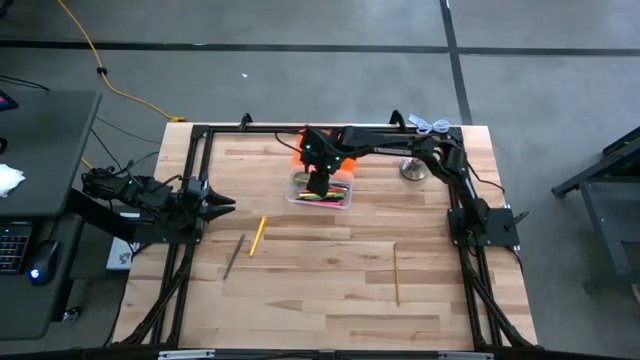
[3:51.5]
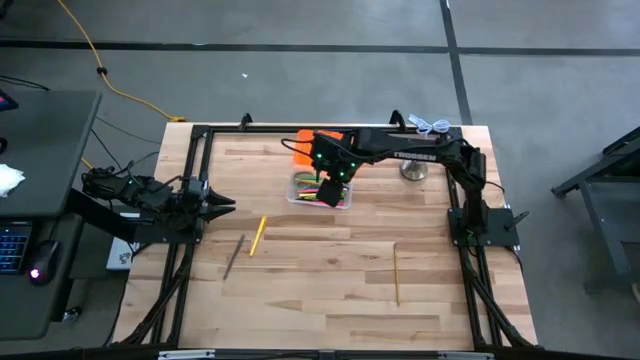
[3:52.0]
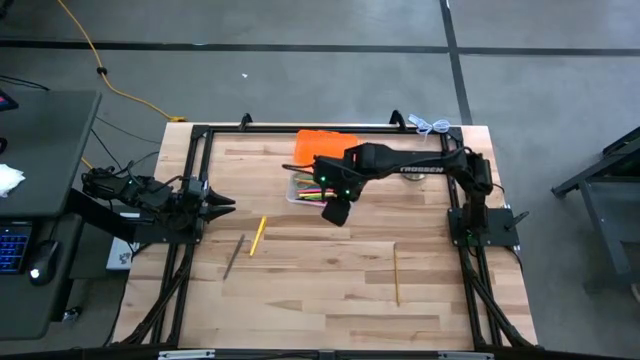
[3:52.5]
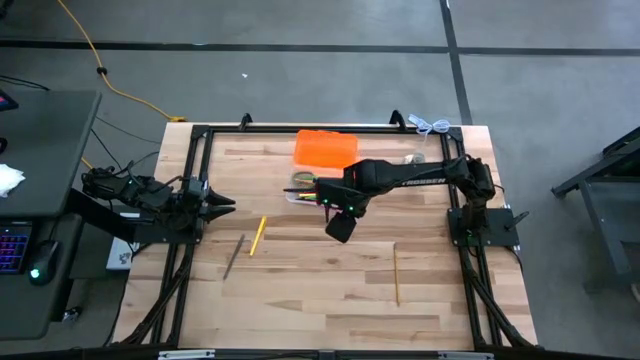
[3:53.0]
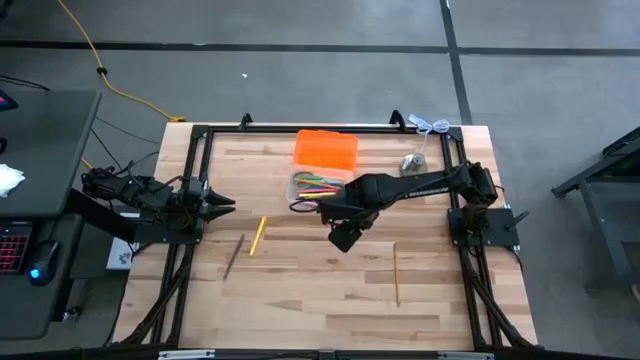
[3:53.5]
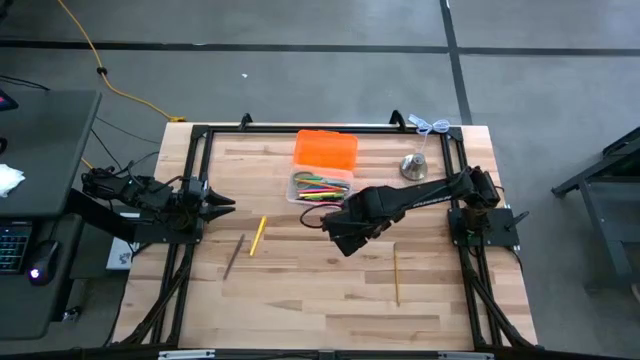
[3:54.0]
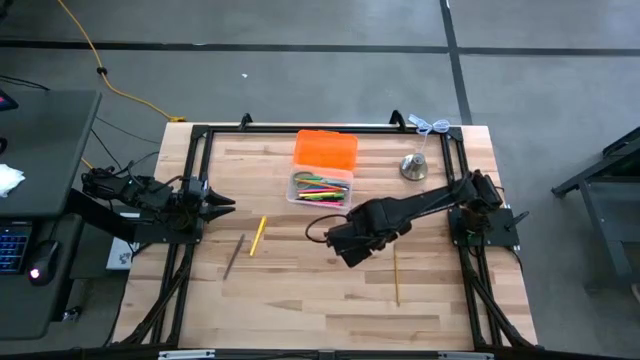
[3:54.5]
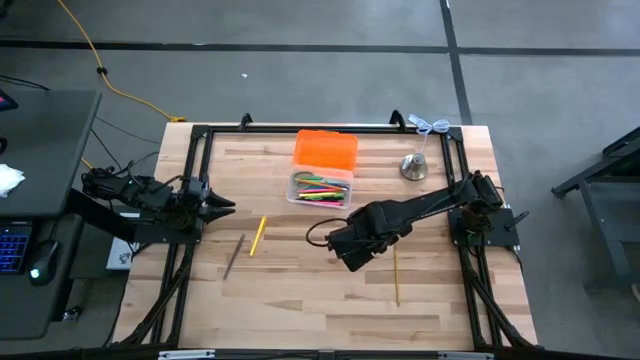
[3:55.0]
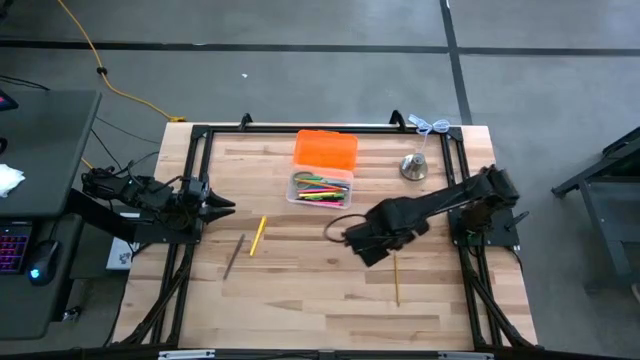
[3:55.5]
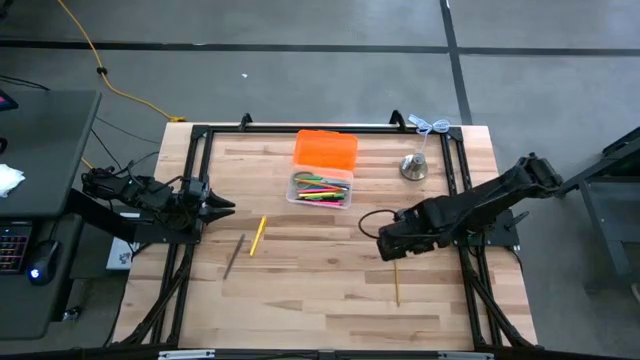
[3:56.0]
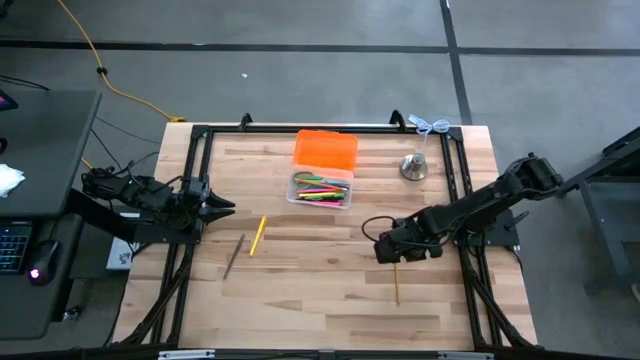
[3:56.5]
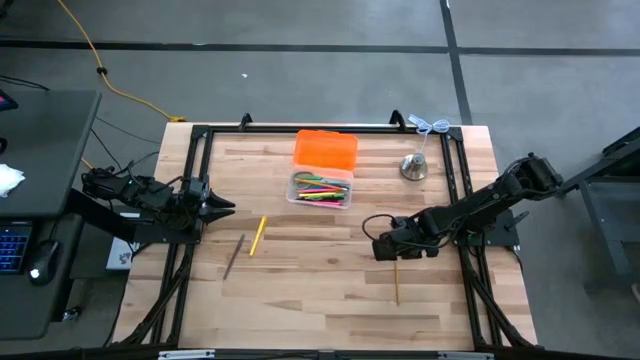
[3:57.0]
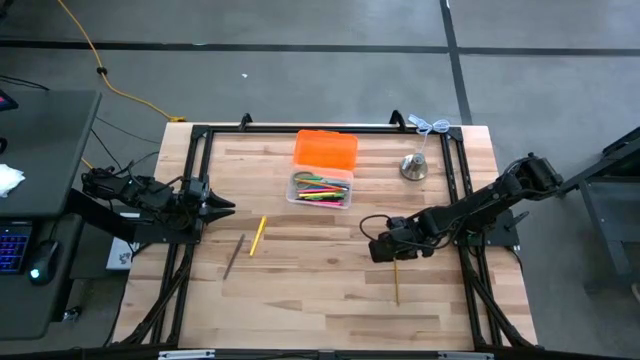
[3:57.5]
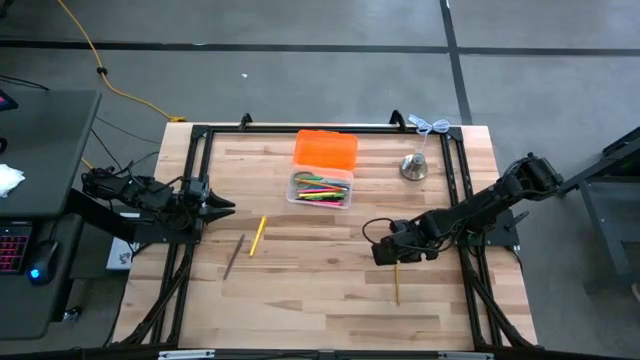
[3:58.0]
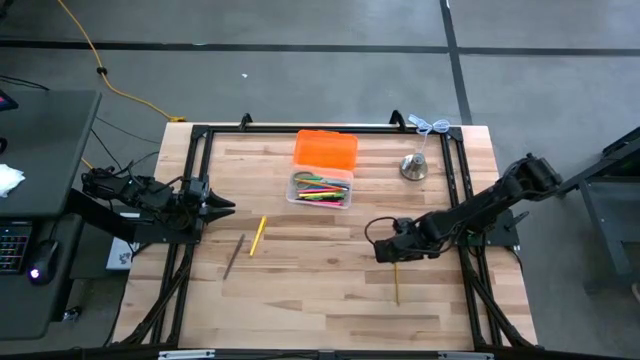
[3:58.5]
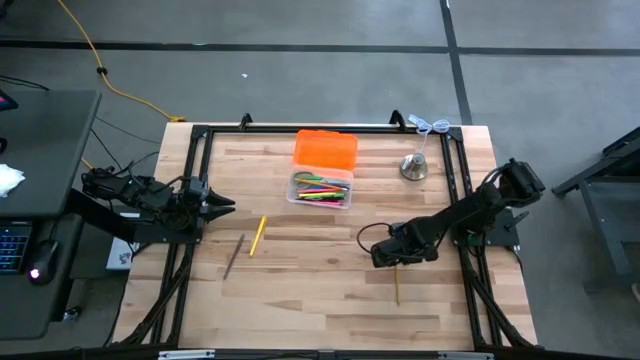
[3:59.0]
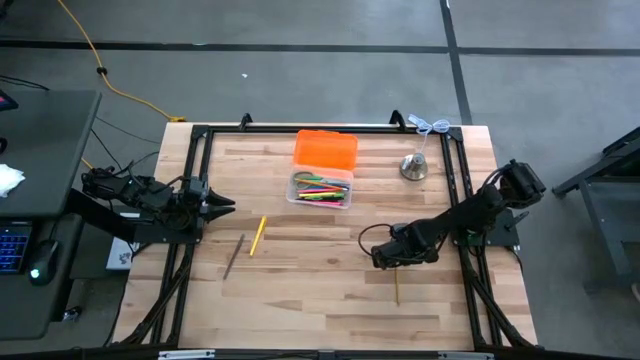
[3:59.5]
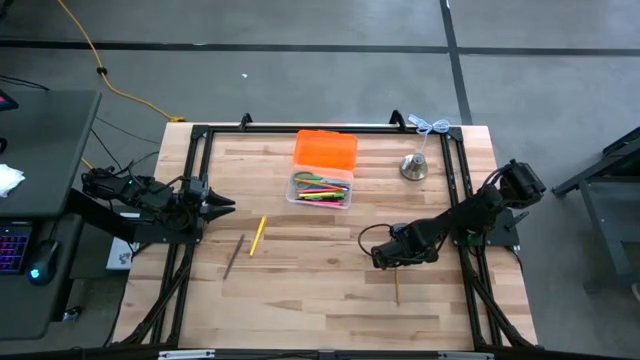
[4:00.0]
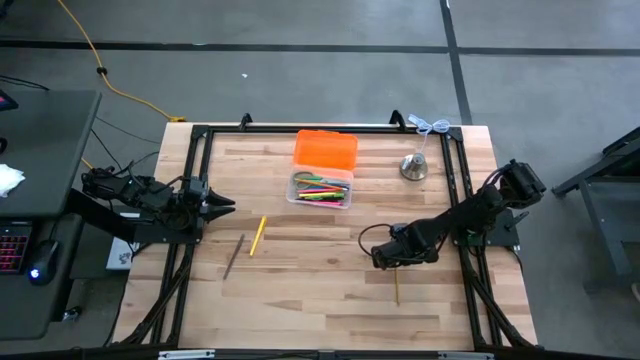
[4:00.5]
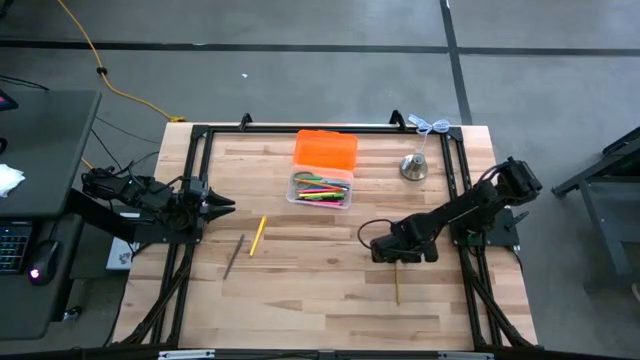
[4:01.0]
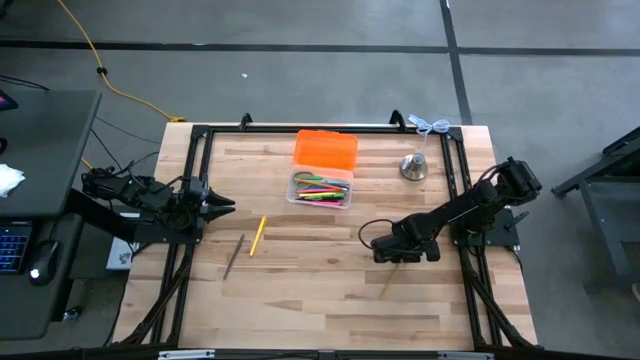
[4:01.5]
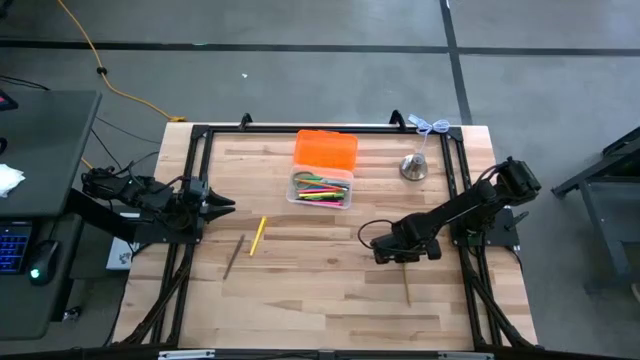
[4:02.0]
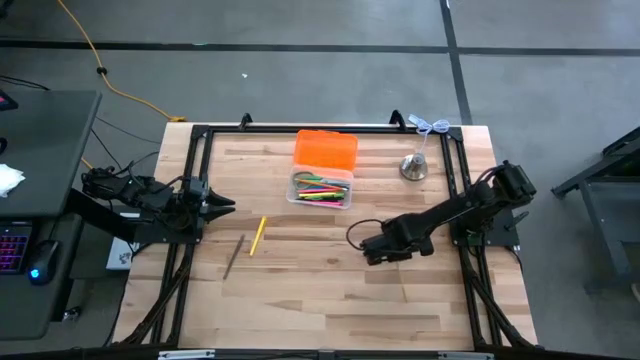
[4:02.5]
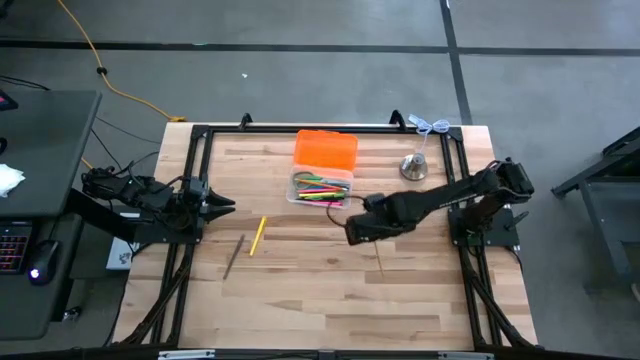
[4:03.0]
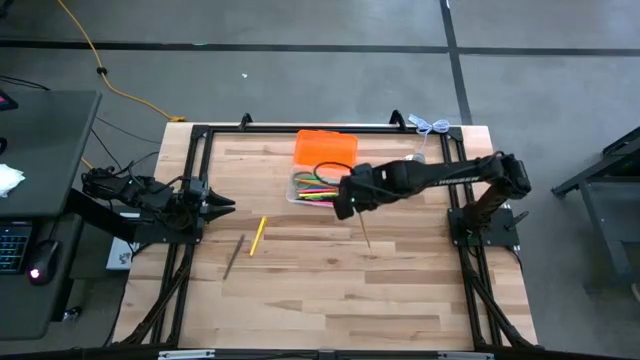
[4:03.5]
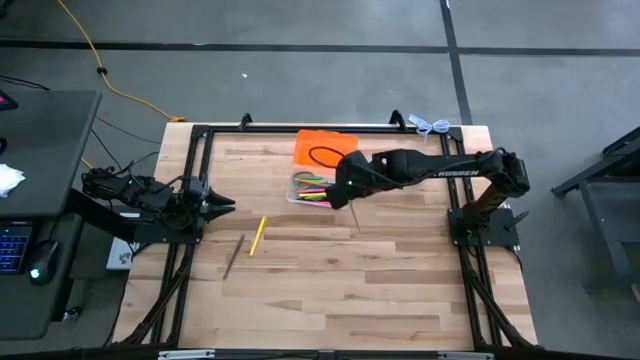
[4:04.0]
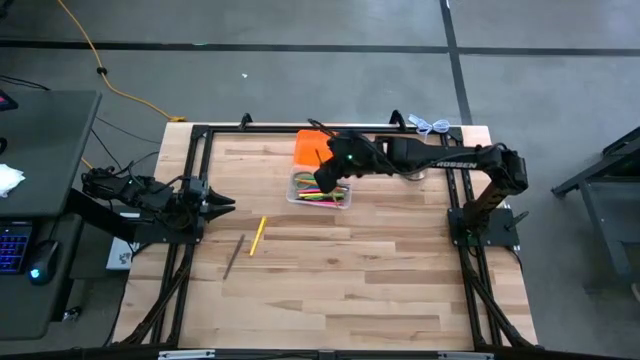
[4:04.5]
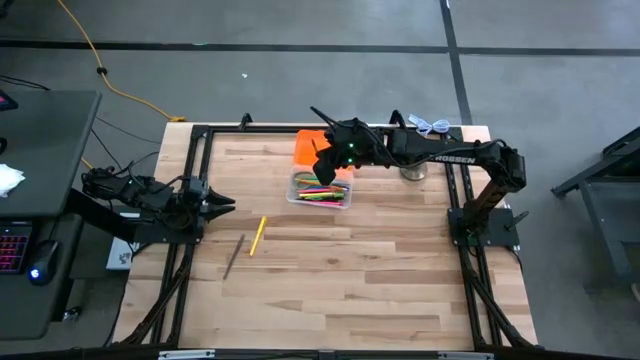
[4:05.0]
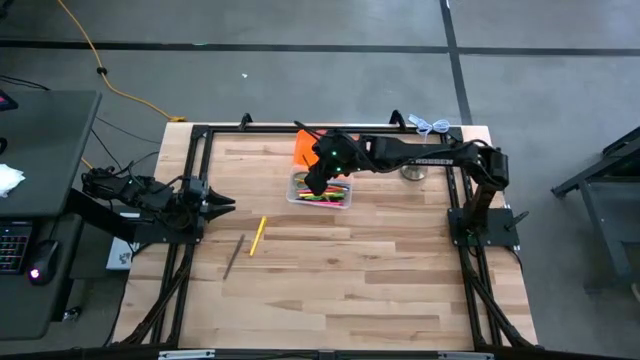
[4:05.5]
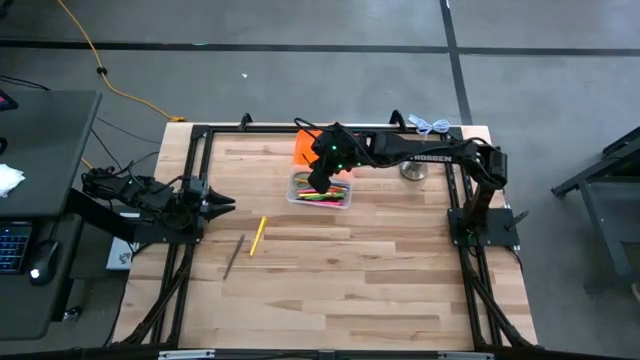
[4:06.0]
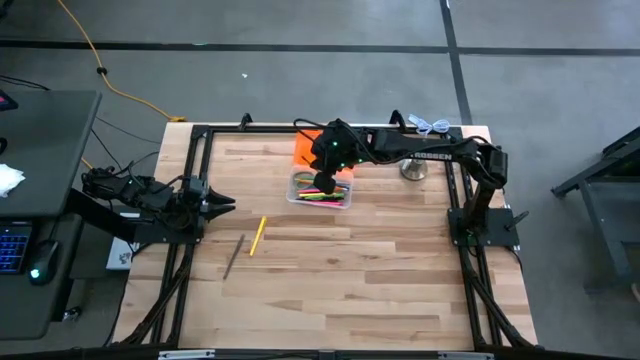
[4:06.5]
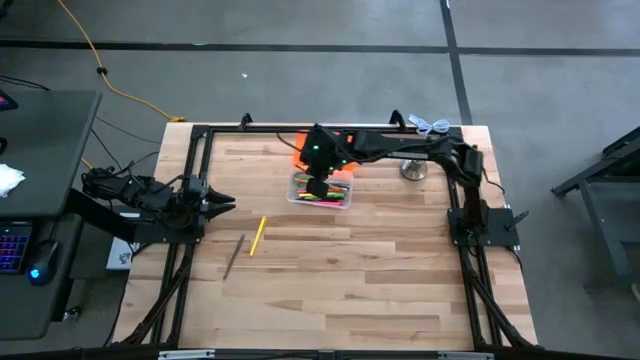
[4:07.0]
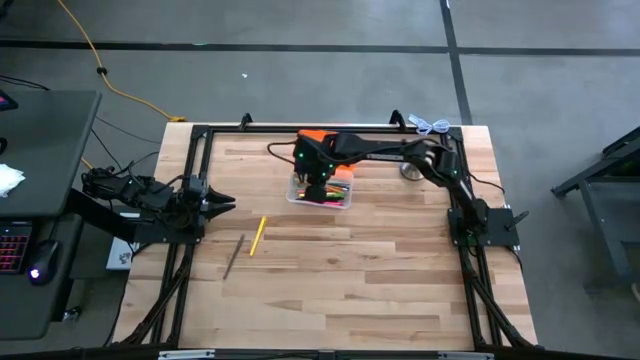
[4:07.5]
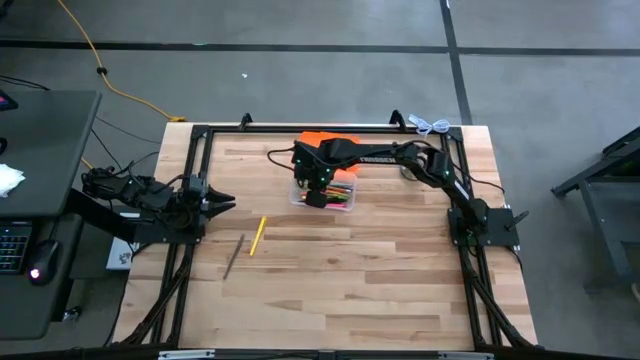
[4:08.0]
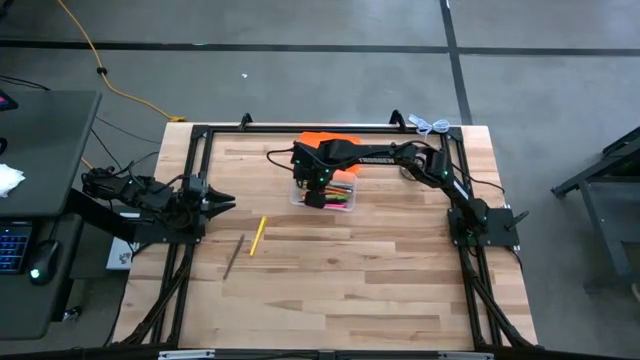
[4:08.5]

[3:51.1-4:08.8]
Task: Pick & place school supplies into a supply box
Put the yellow pencil into the transparent supply box

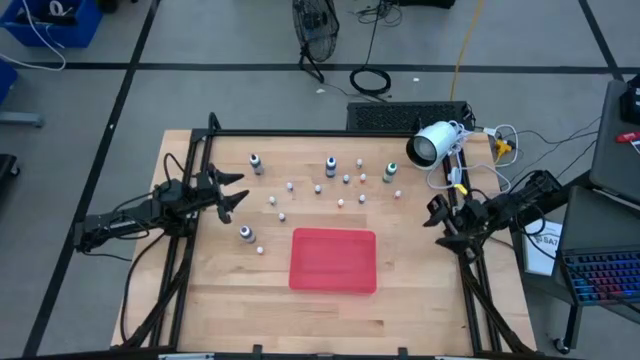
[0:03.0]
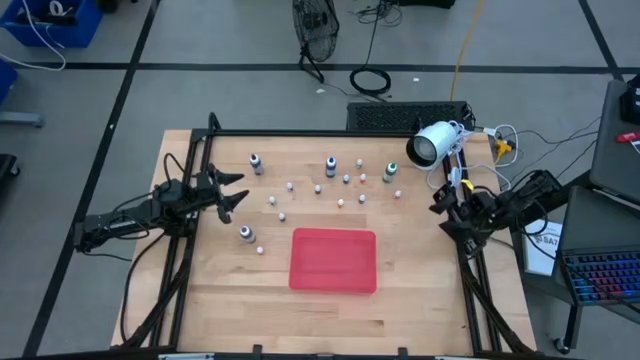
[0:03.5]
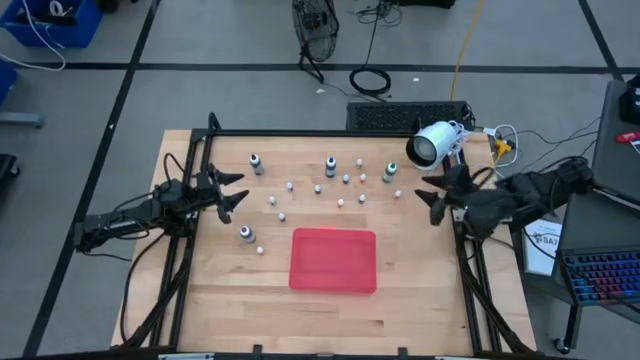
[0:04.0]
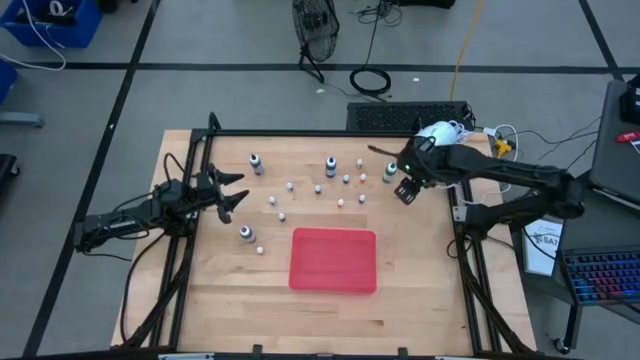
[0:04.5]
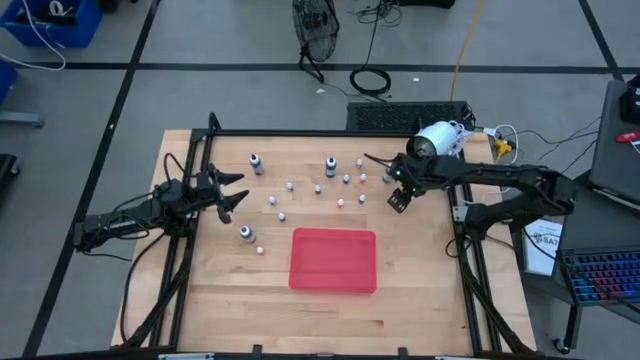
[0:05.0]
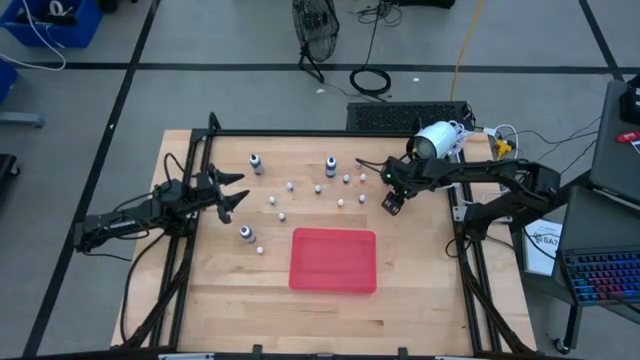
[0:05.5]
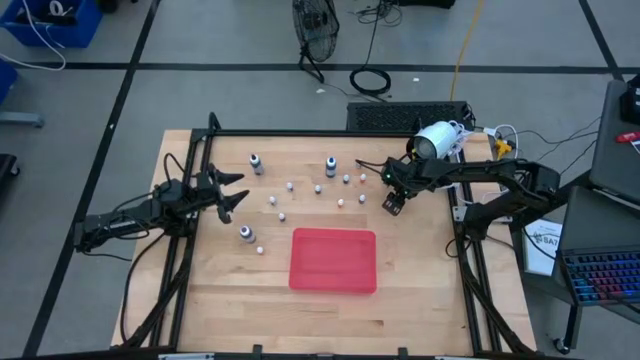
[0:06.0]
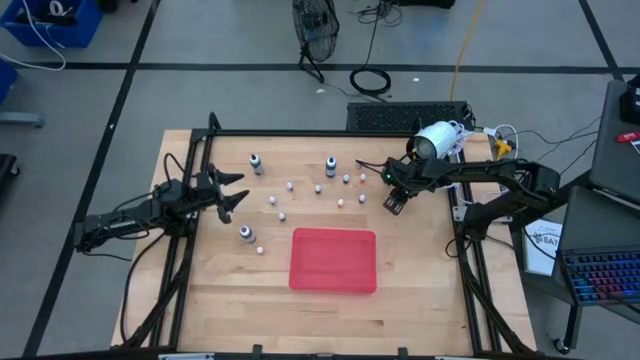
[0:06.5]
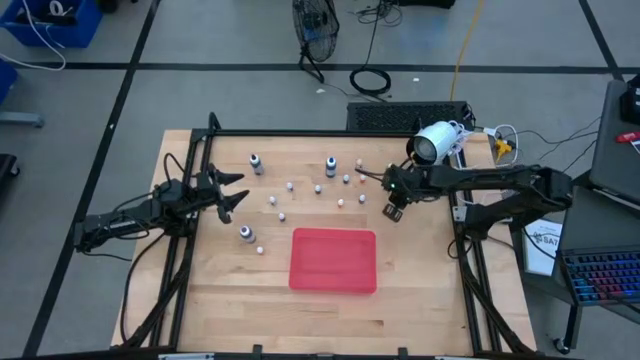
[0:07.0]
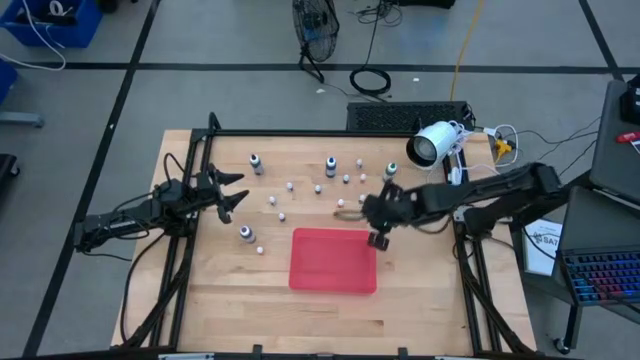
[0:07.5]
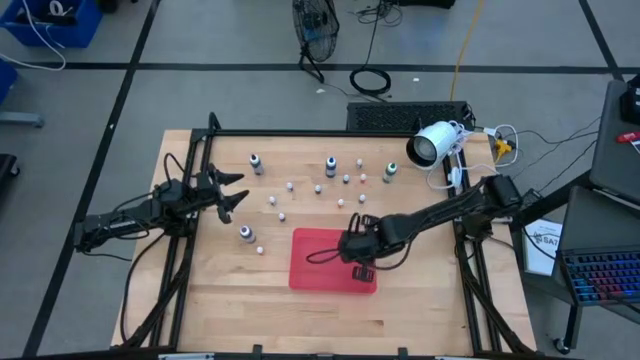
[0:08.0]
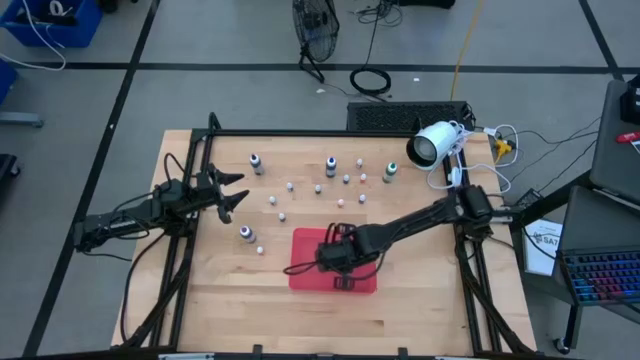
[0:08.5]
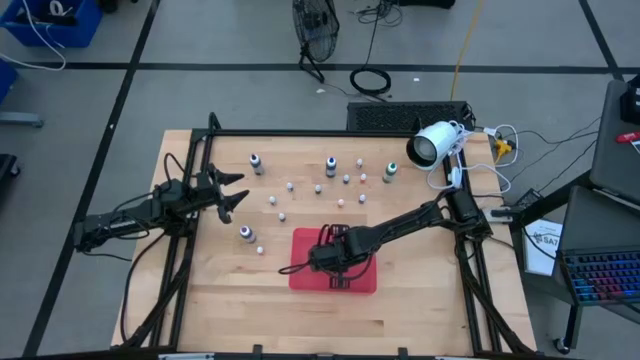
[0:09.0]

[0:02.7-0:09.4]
Task: Pick & Place food coloring
Put the small orange food coloring bottle into the red bin
